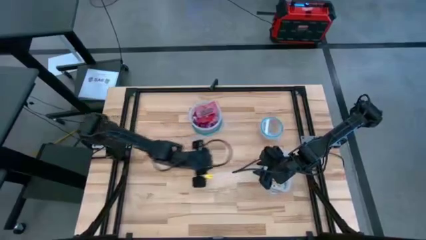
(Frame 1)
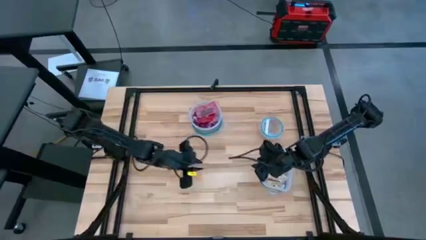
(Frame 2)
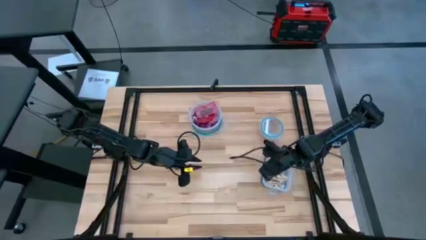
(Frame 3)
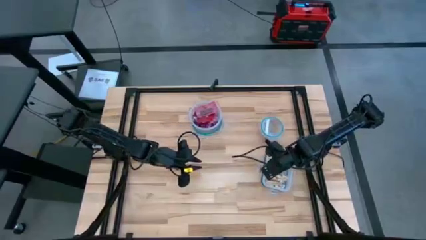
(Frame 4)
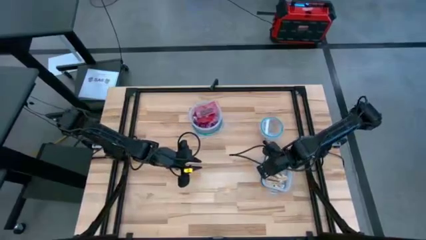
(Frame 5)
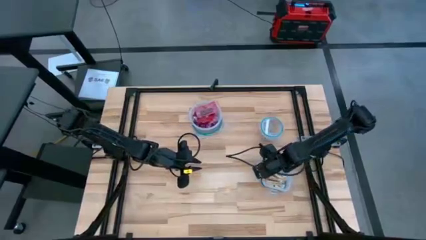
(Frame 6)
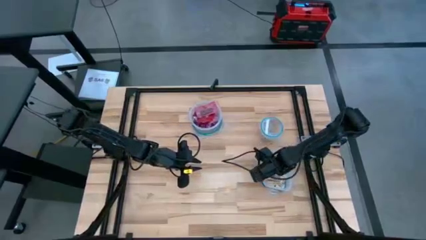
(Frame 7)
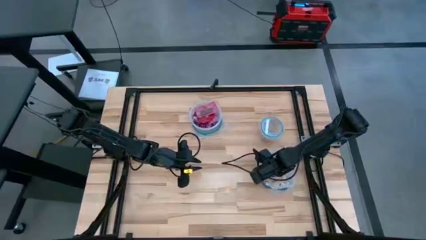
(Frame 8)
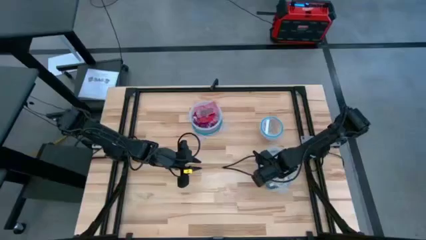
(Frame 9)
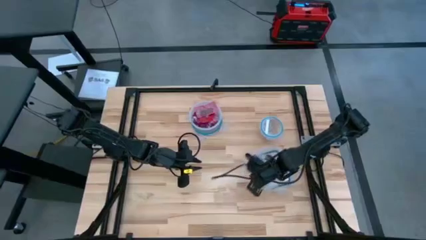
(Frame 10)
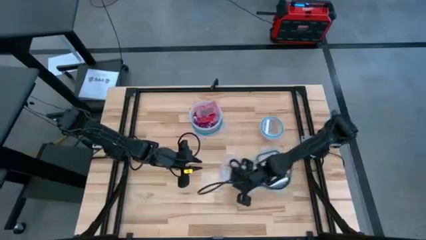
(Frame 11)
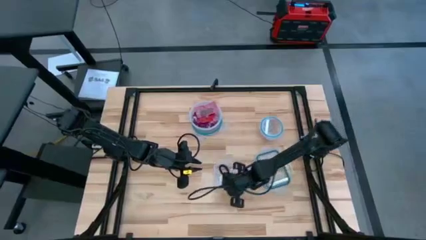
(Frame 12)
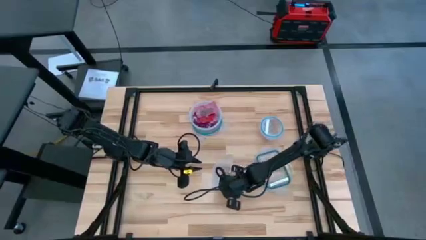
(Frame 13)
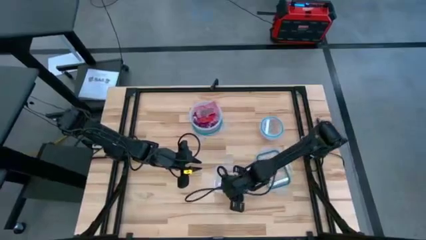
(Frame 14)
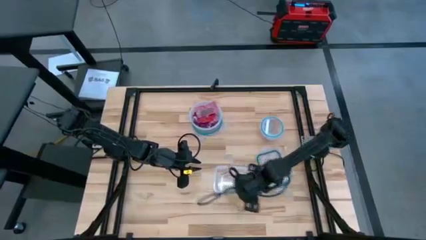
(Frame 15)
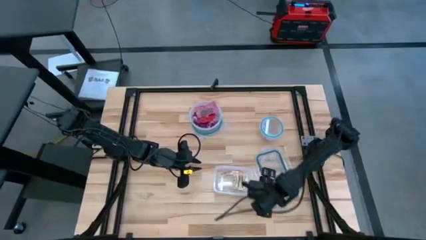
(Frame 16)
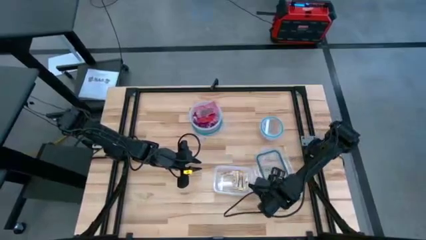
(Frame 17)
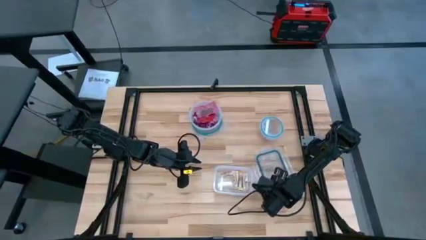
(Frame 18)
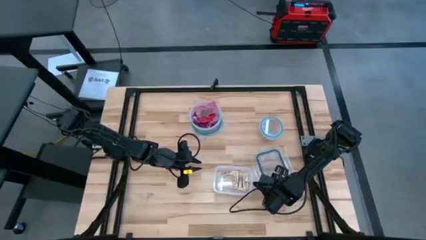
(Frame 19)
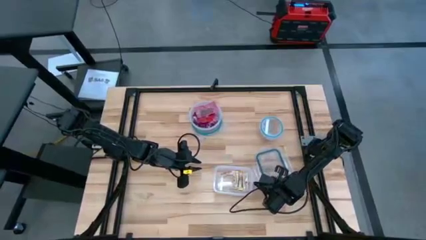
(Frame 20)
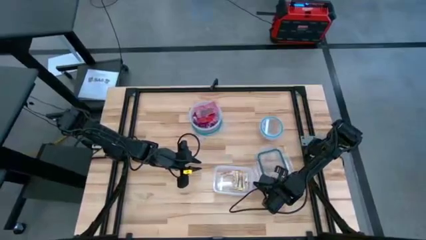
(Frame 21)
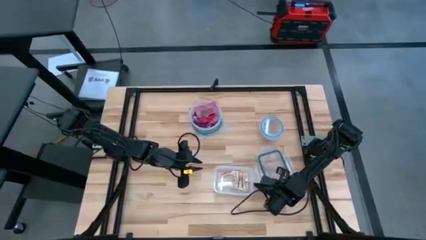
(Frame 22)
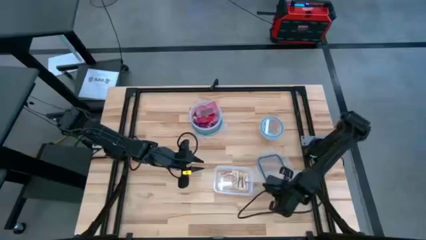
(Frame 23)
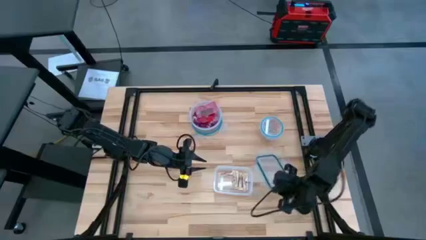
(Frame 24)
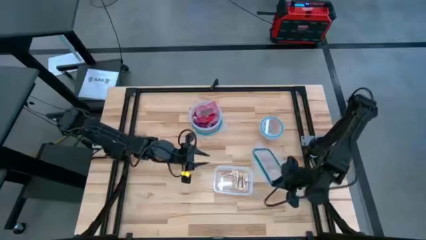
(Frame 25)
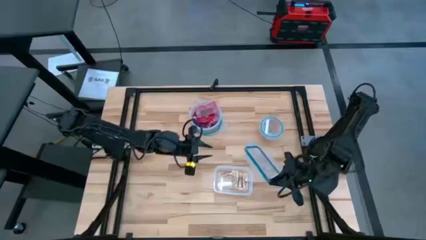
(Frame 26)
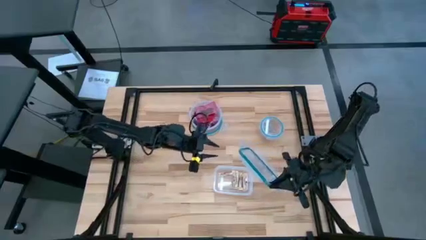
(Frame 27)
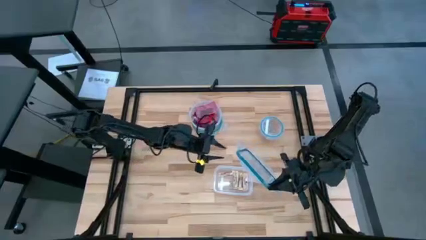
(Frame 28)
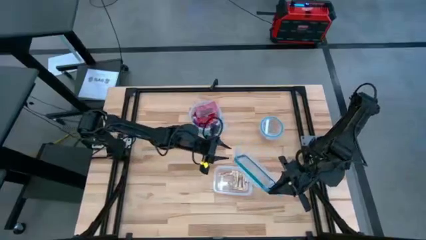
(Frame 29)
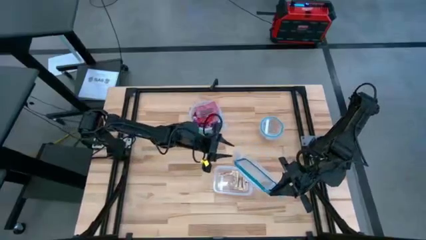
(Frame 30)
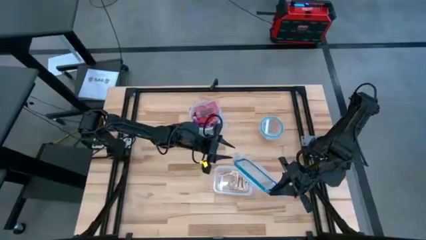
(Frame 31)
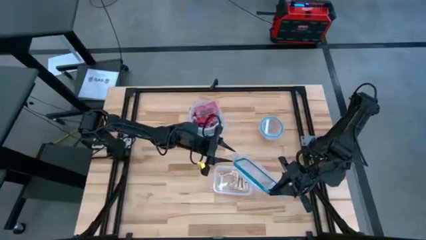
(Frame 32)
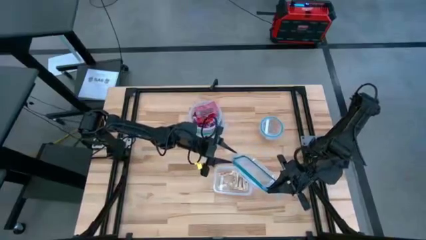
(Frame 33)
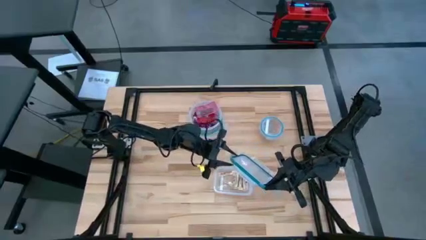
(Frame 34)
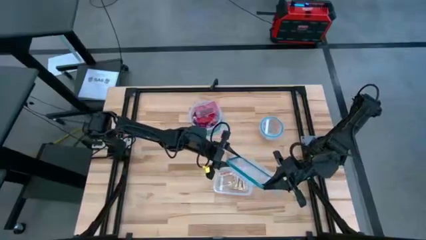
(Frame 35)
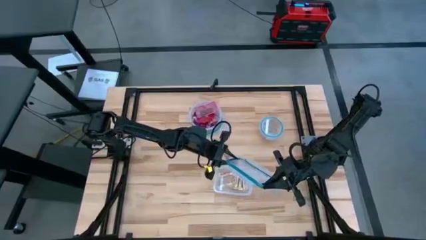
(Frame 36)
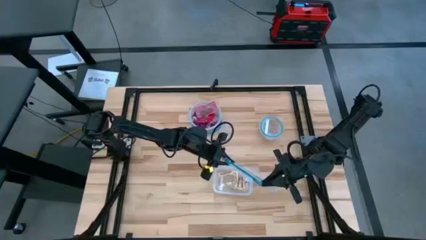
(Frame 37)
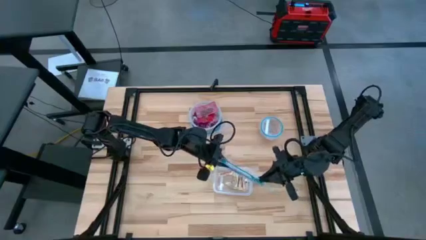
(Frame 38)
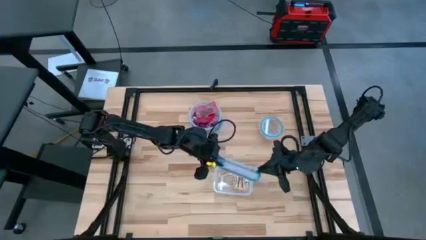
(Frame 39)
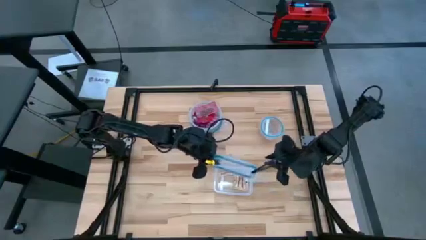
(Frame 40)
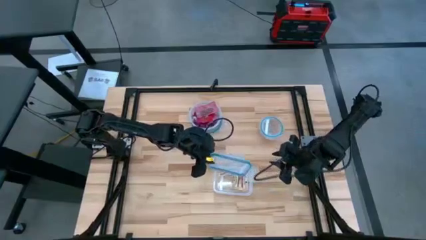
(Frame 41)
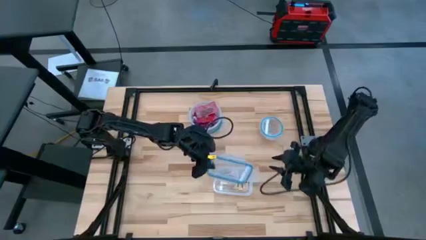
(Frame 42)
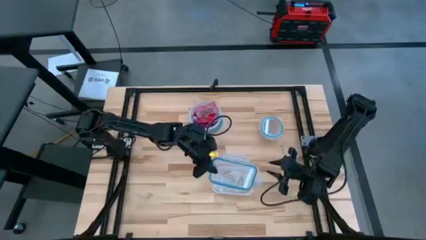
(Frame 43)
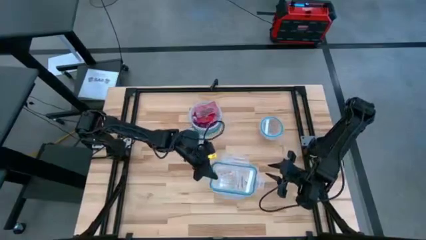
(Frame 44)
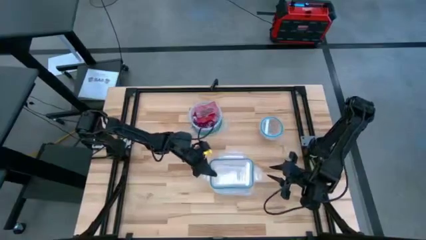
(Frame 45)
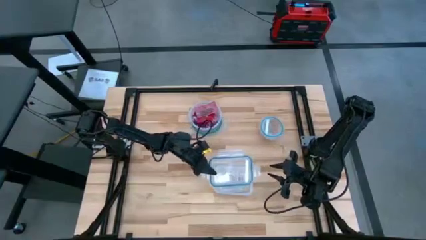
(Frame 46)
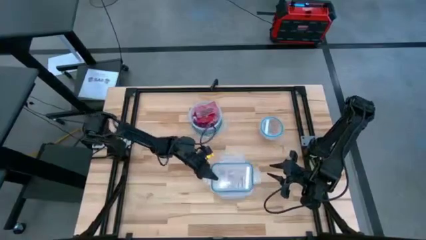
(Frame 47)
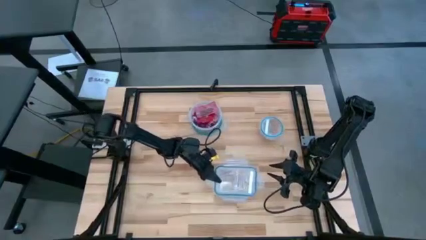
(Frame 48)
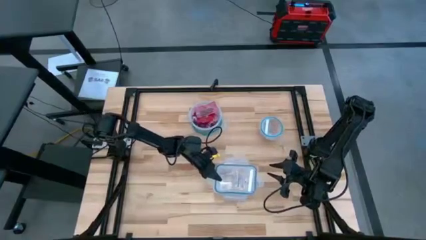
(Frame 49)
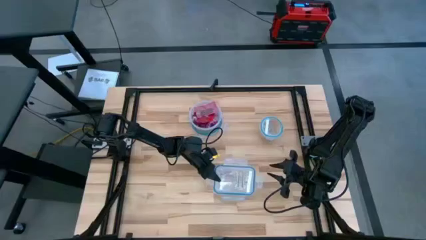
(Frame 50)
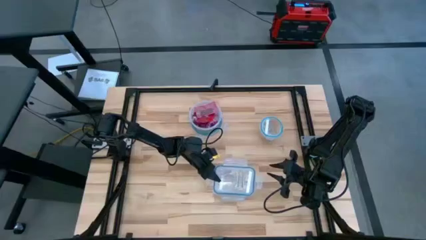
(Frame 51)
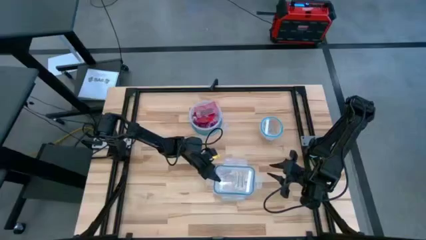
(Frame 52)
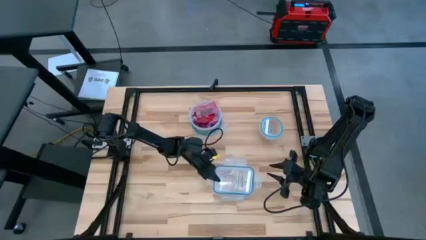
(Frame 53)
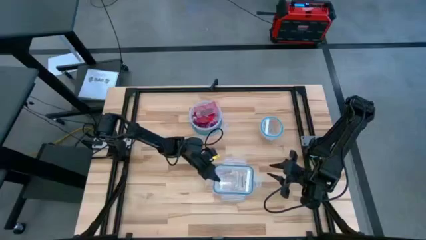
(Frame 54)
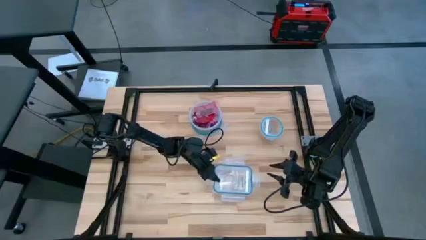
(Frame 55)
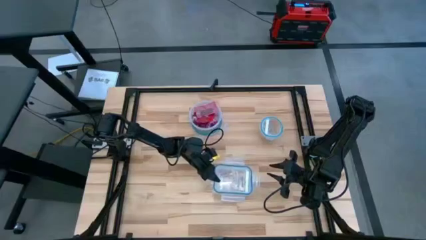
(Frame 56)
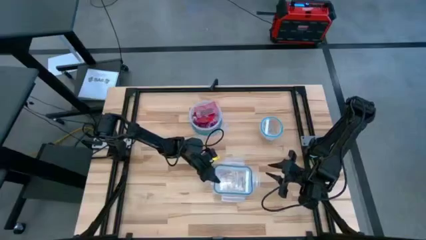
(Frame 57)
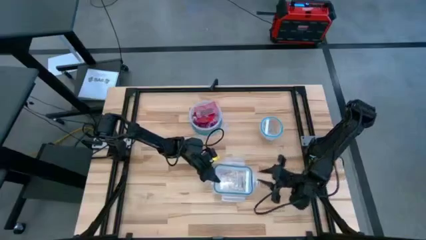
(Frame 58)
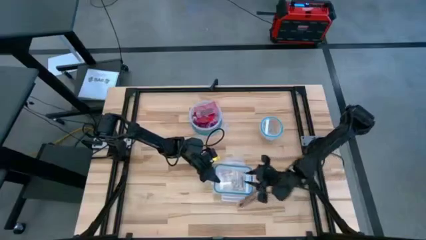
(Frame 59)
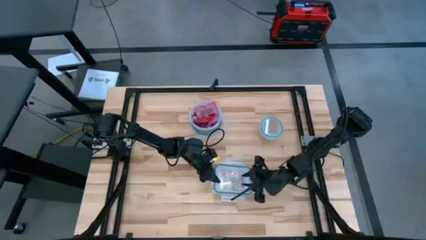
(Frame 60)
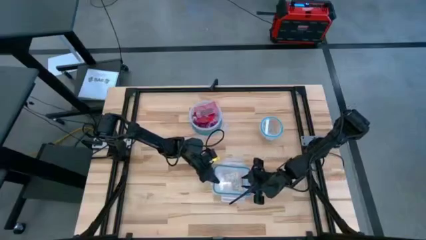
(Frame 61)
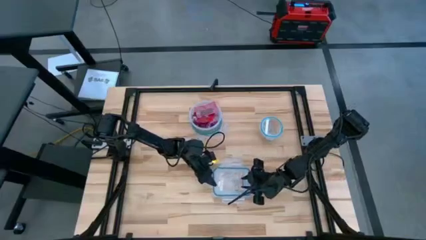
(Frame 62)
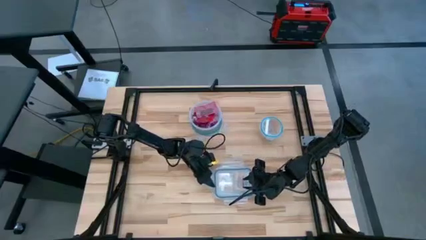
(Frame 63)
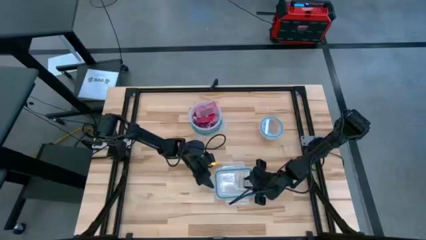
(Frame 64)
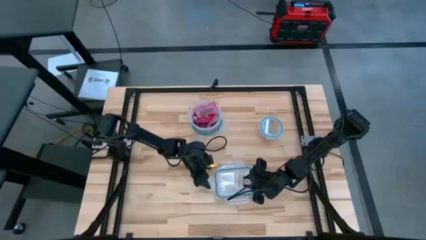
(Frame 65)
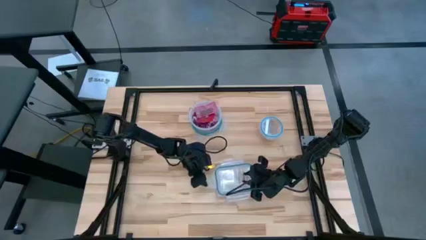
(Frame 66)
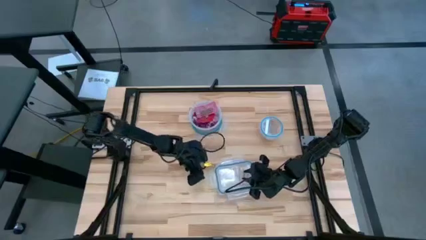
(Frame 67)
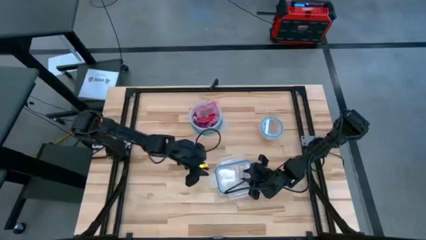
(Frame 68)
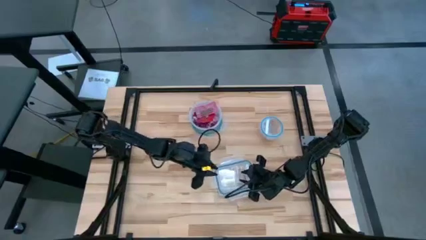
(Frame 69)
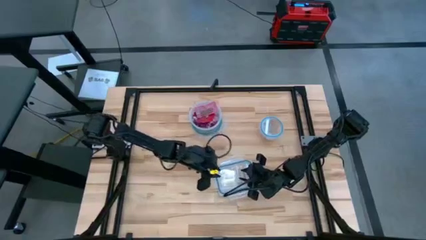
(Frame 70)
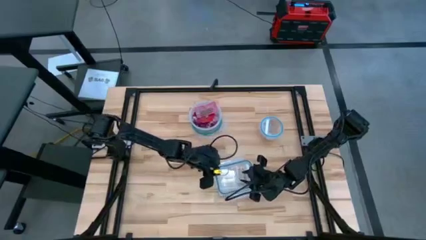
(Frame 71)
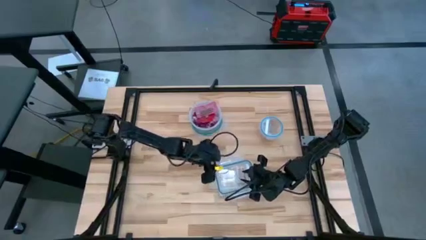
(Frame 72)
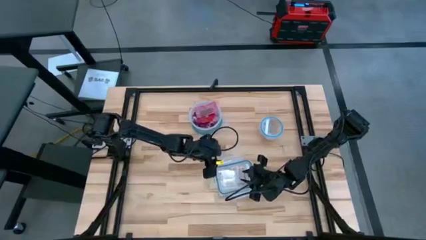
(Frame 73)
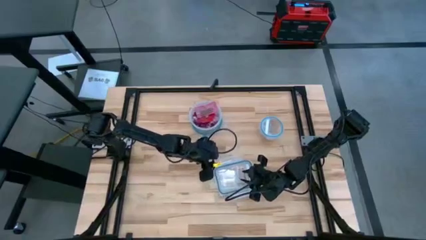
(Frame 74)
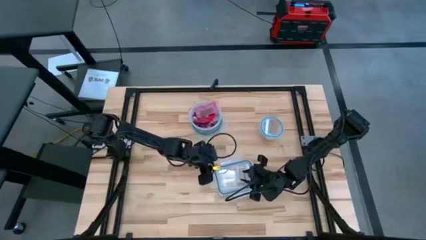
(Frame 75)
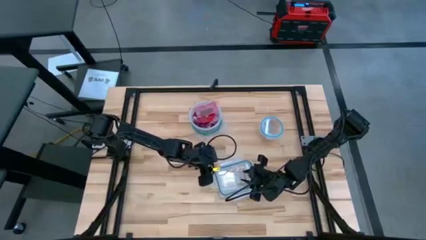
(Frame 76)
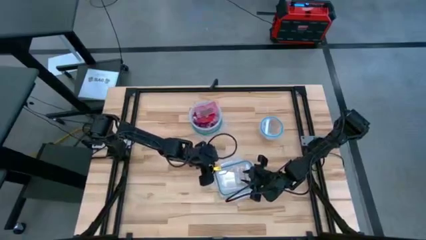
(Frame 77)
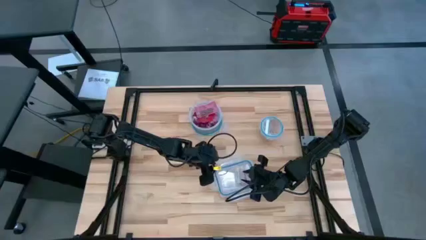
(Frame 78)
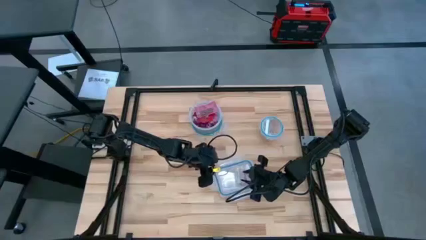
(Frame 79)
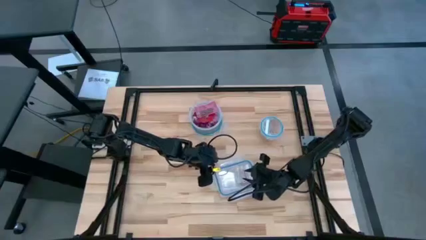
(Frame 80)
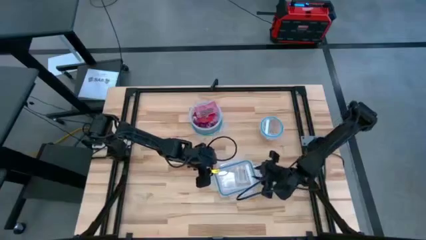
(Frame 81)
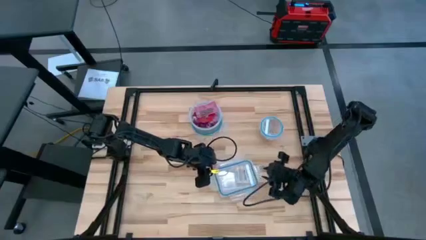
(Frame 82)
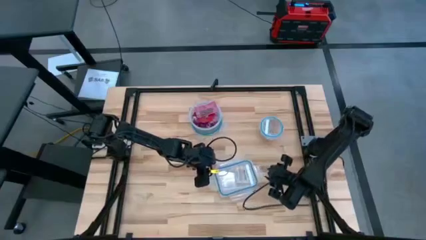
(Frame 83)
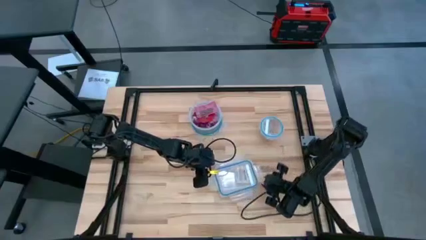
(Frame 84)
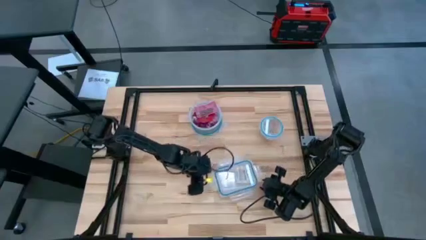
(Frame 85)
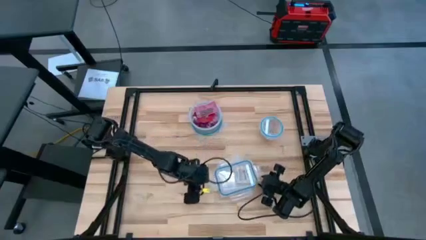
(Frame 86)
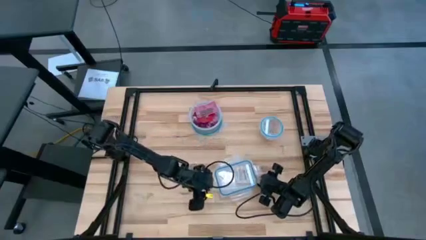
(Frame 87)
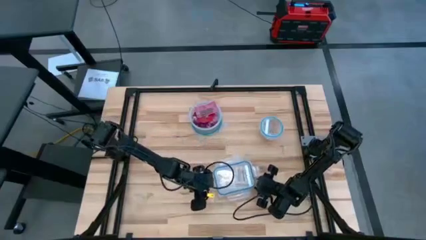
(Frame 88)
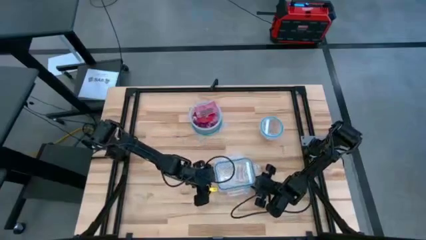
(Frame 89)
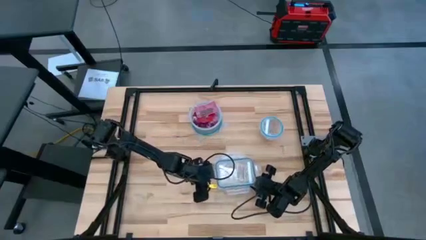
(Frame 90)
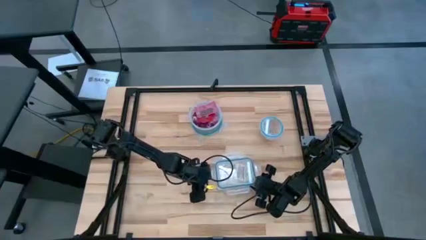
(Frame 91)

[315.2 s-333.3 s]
Task: Sort candy
Close the rectangular transparent bin
